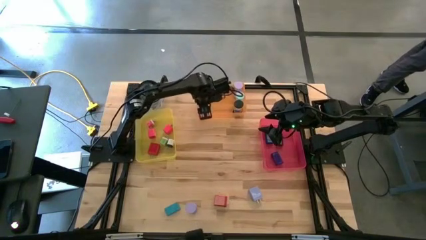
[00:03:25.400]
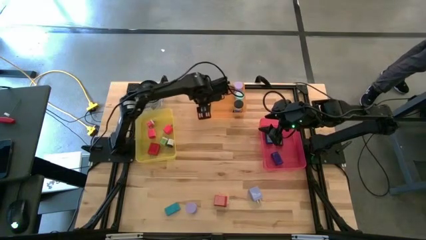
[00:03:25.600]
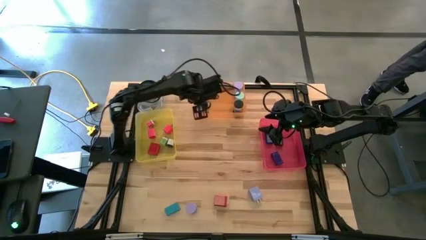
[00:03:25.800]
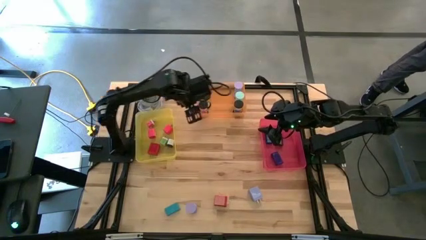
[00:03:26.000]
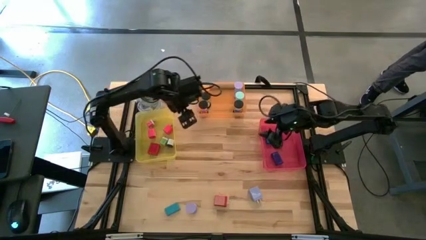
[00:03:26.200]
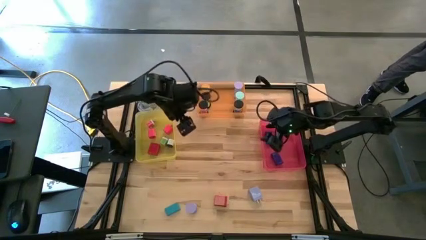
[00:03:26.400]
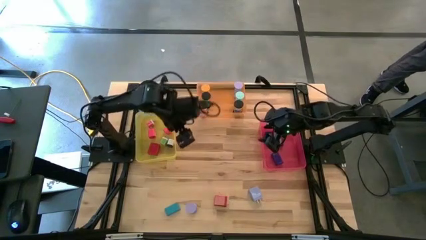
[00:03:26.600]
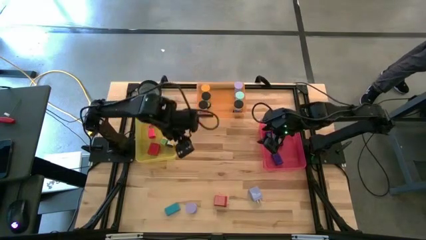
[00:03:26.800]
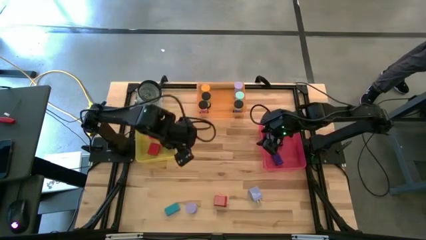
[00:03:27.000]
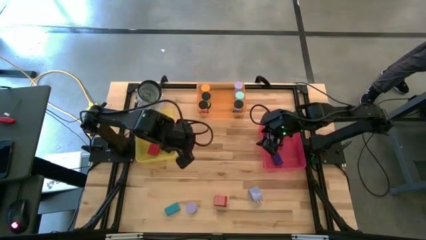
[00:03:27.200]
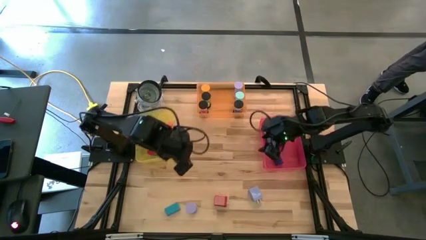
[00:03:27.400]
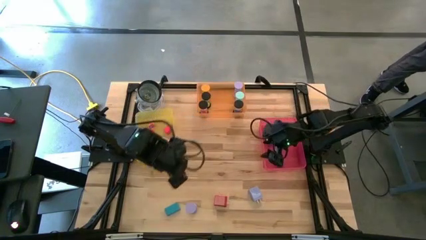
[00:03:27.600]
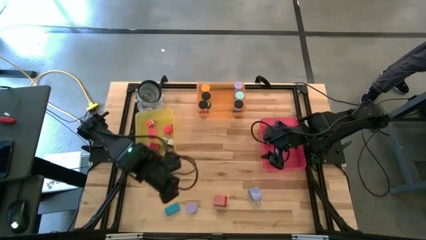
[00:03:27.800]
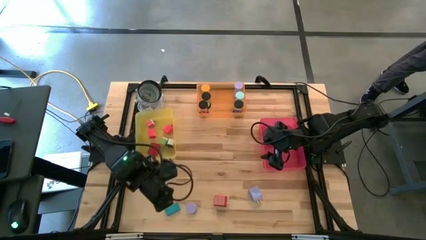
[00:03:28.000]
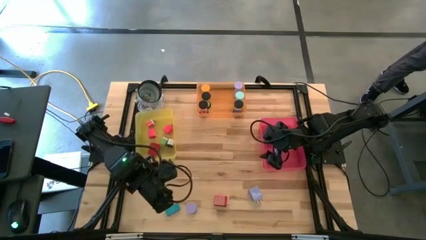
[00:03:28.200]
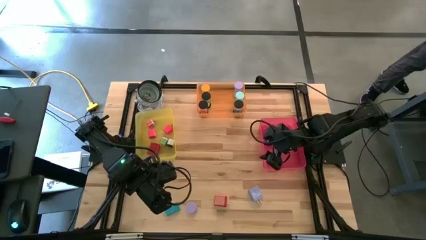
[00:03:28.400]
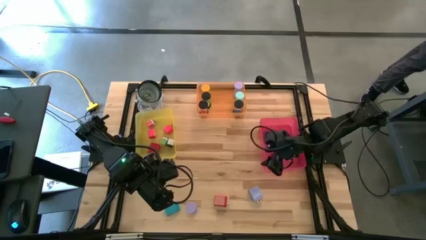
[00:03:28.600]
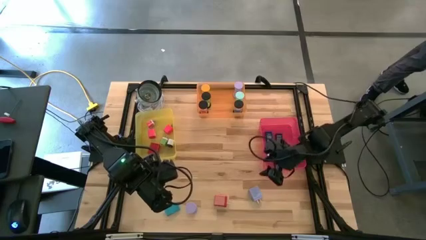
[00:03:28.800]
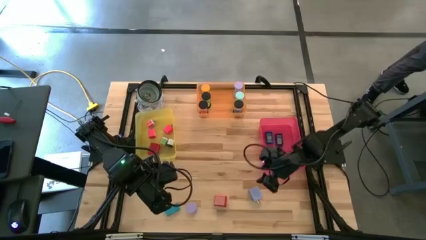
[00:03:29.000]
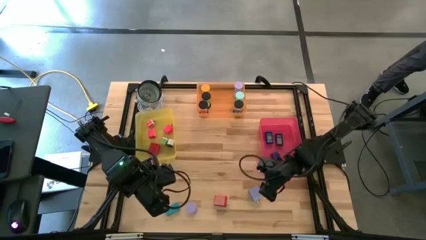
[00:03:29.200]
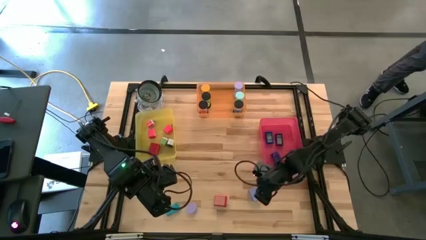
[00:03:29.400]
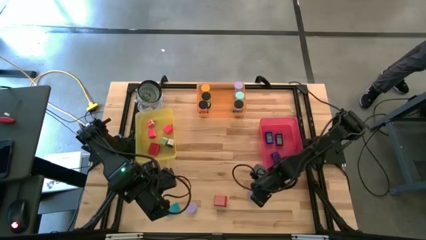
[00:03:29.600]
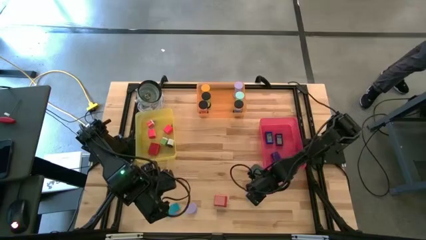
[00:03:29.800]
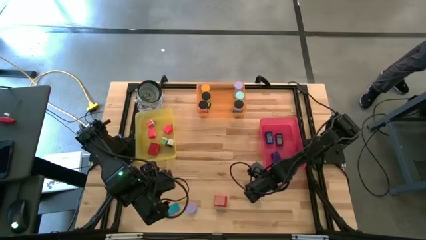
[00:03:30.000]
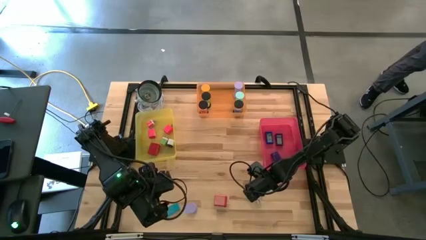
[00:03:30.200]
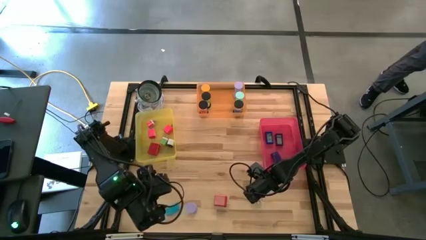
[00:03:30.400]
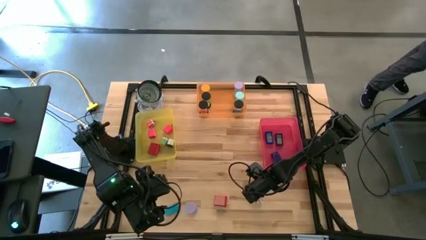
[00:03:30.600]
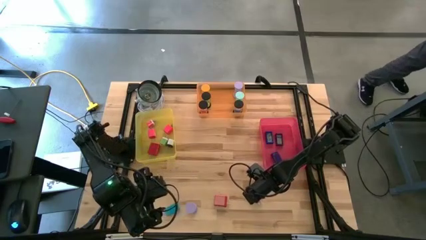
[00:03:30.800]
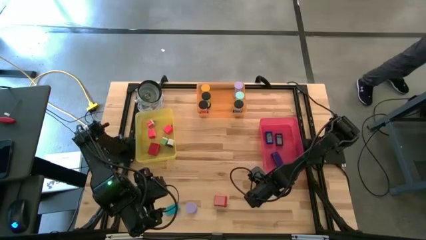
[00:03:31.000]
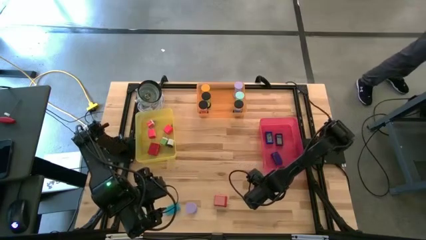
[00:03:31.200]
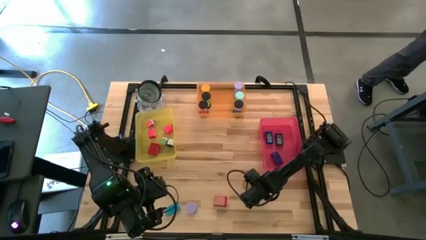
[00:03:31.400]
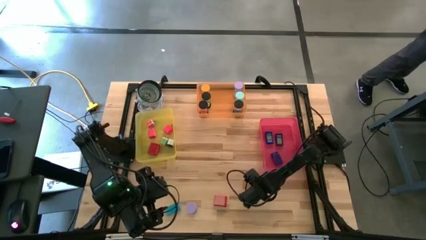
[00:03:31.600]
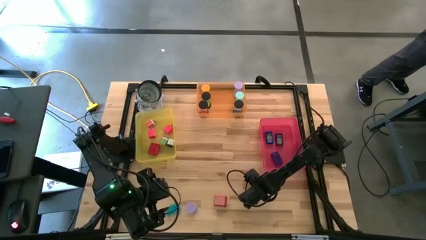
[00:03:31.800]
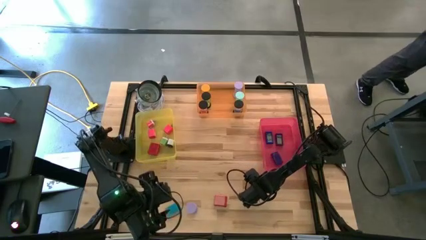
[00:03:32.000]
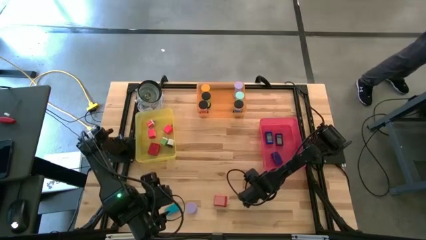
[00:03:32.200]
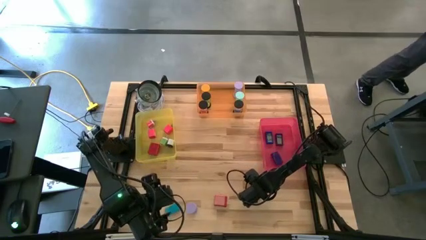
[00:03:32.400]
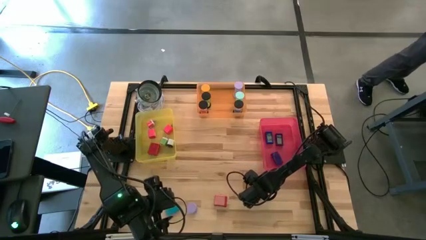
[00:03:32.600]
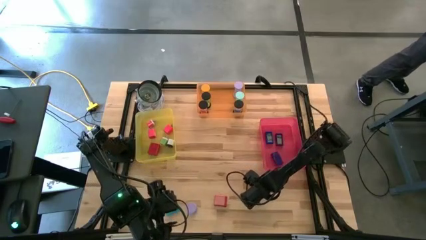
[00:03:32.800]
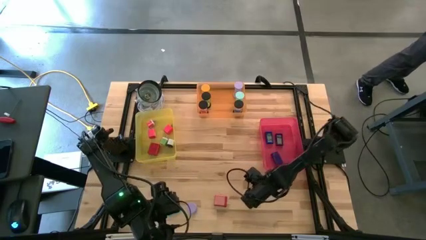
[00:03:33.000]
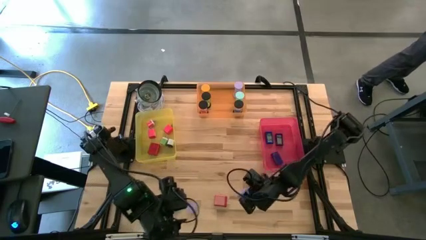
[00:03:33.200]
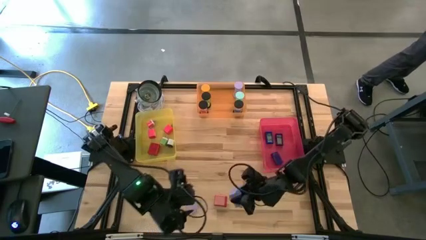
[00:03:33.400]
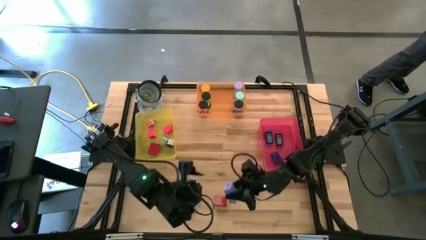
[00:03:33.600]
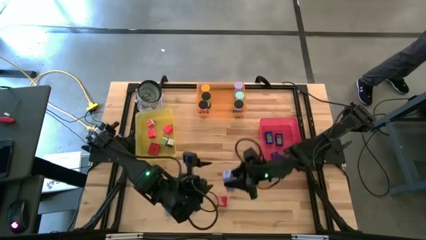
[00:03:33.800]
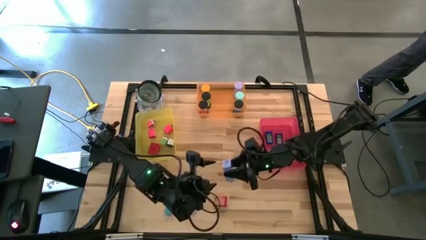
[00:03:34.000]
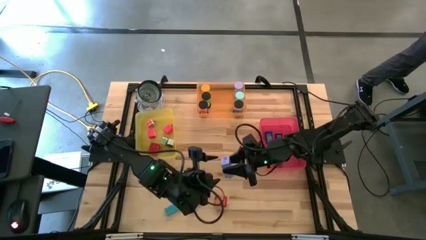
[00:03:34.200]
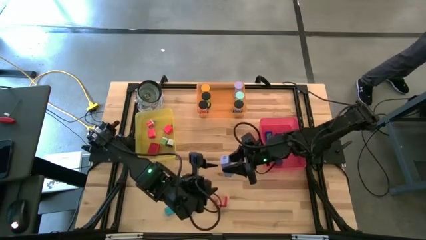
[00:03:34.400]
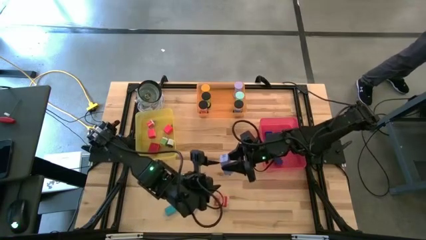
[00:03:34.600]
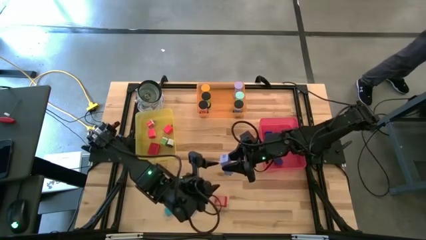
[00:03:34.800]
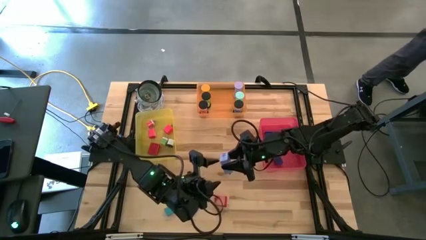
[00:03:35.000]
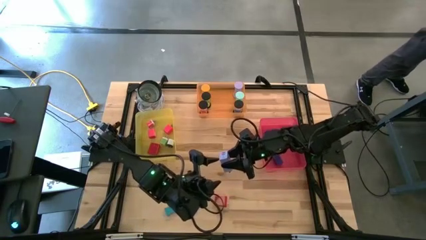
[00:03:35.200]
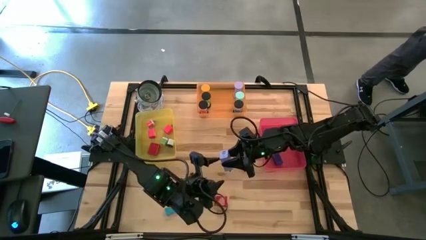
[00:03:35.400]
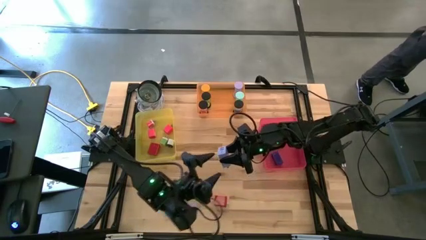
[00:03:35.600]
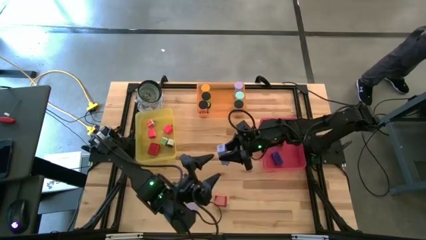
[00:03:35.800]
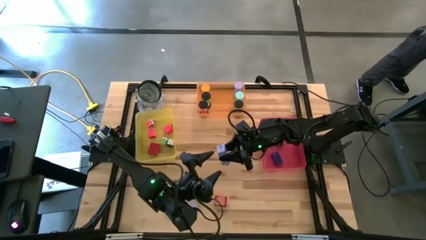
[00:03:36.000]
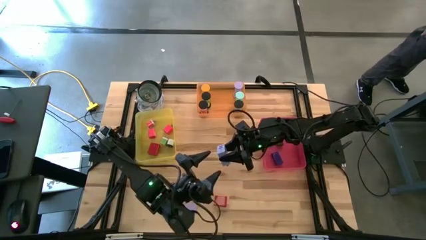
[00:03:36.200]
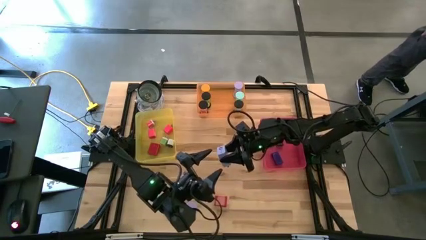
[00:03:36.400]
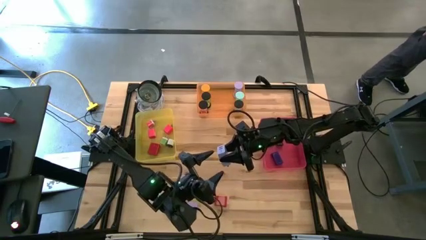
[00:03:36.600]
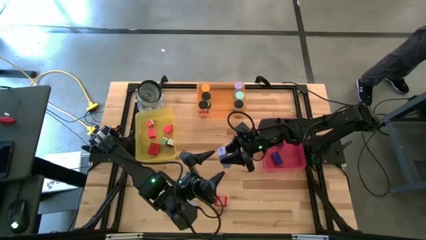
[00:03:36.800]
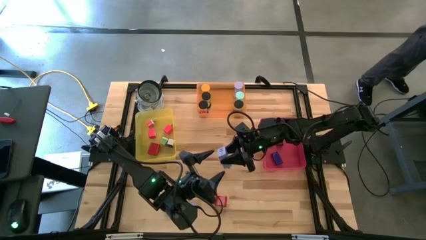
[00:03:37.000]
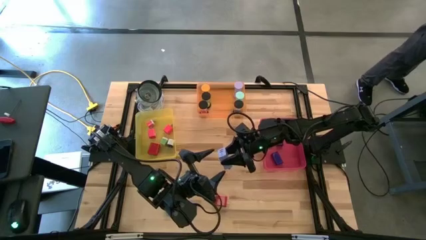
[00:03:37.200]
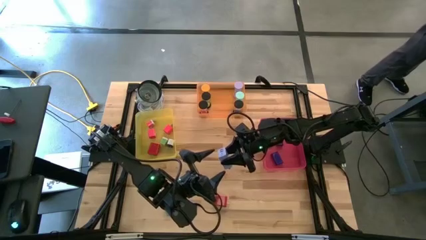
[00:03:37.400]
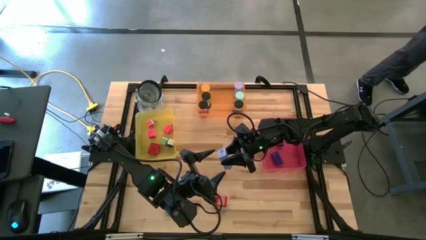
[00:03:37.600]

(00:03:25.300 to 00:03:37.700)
Task: Pick & Place Office items
Put the blue charger in the yellow bin

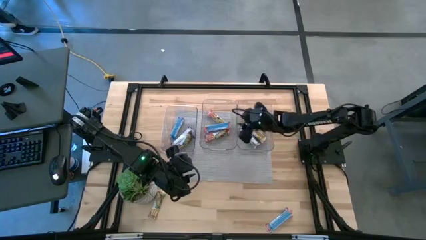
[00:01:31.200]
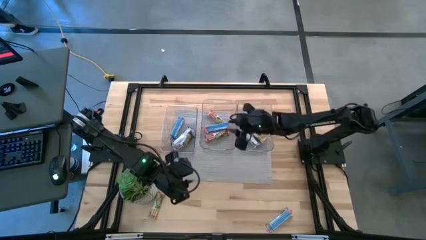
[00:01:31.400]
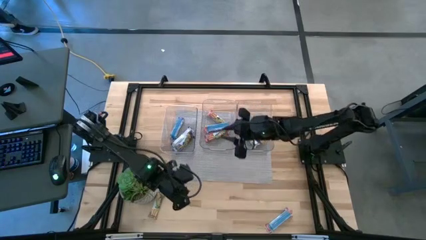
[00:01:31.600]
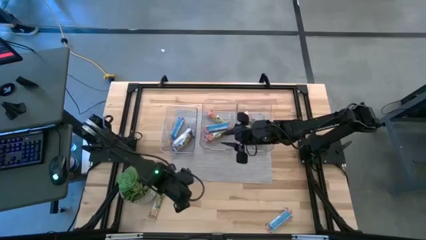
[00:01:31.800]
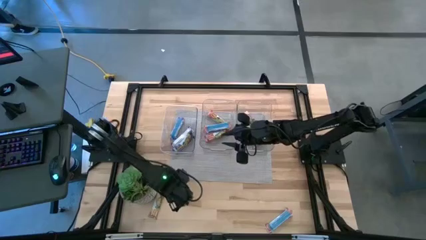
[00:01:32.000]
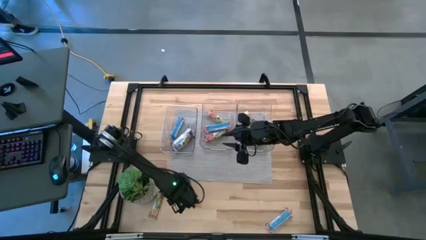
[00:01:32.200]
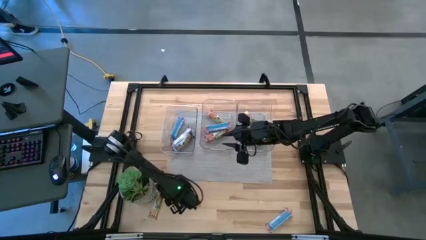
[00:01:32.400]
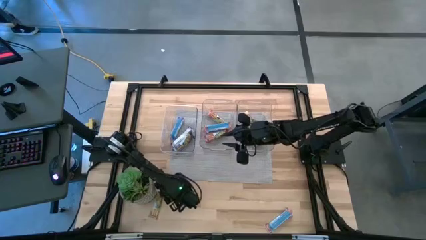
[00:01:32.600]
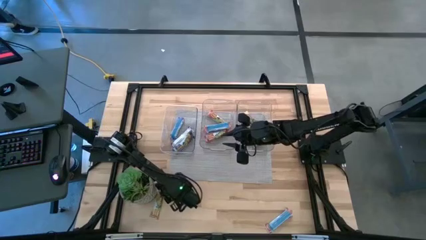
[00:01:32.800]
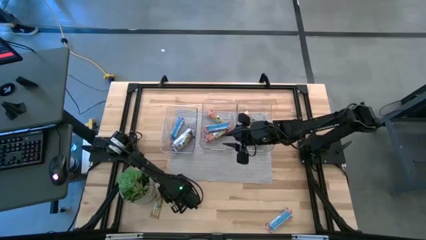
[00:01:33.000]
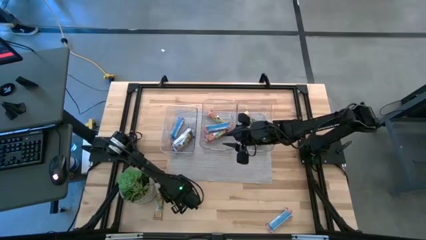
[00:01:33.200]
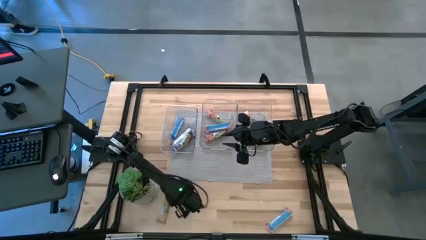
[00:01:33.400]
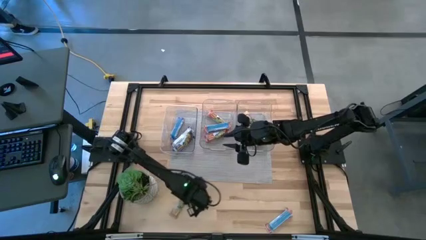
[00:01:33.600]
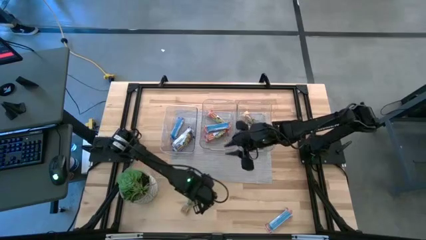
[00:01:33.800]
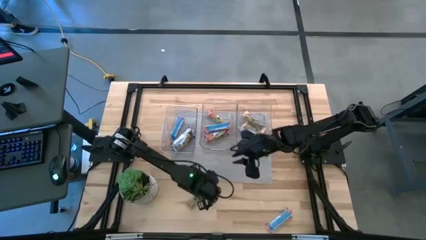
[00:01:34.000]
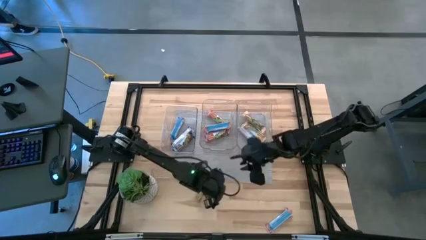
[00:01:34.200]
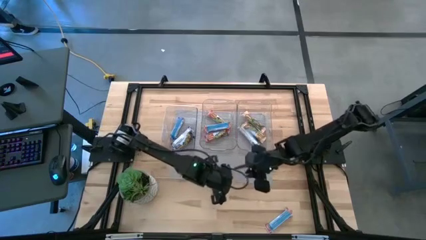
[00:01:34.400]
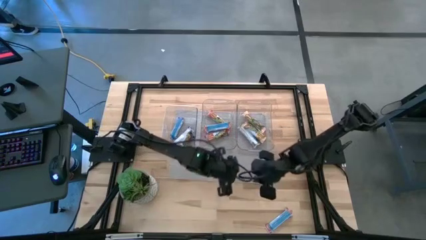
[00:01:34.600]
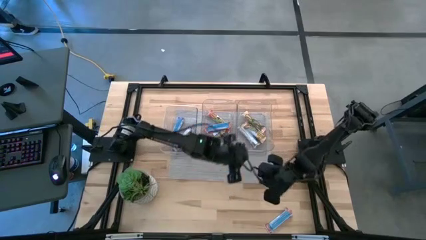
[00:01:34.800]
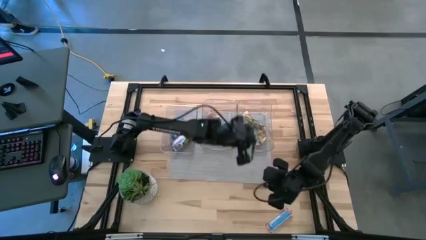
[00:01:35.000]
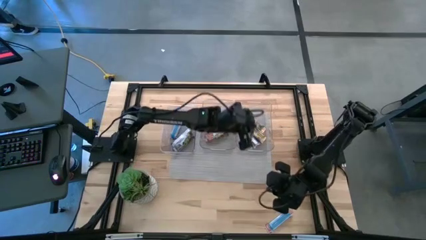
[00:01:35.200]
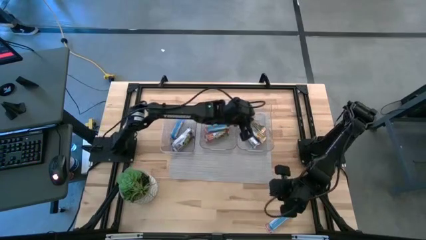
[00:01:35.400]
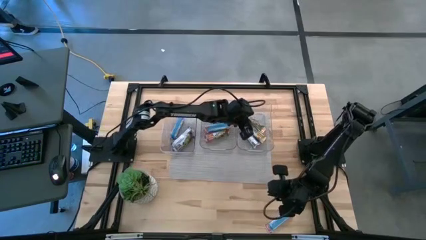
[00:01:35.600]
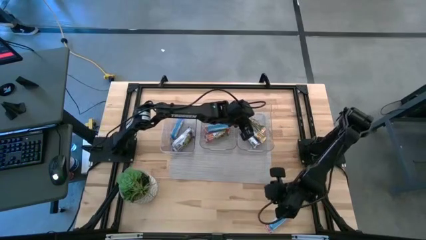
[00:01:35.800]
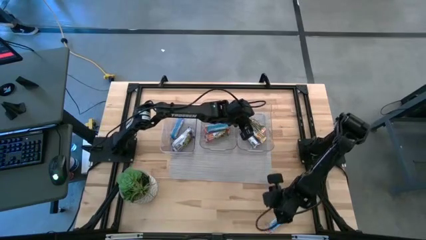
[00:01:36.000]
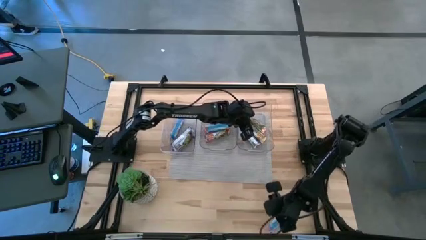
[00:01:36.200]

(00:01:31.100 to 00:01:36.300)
Task: Pick and place Granola Bars by type
Put the orange granola bar into the middle transparent bin
